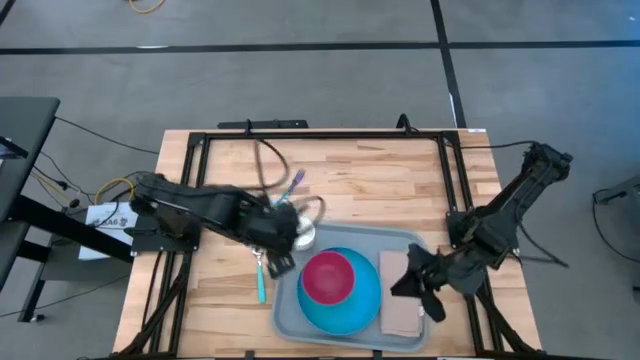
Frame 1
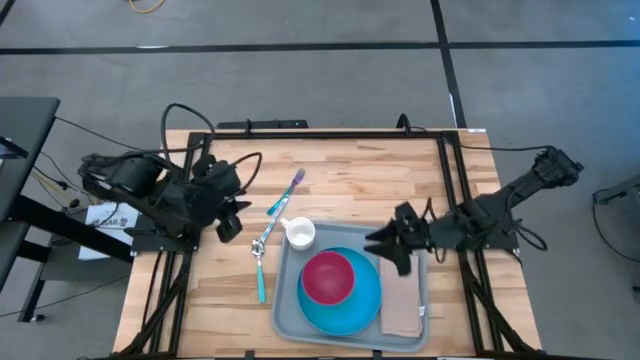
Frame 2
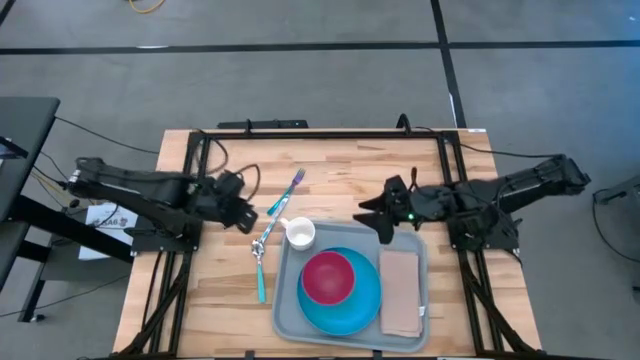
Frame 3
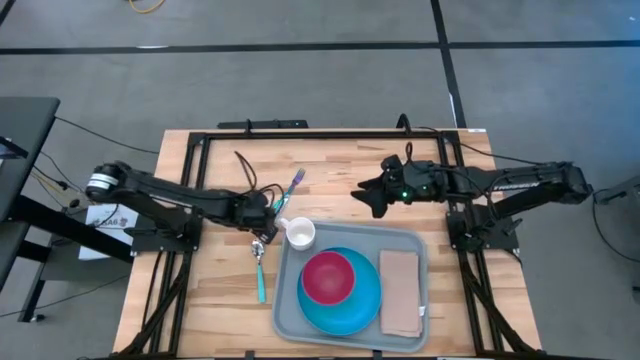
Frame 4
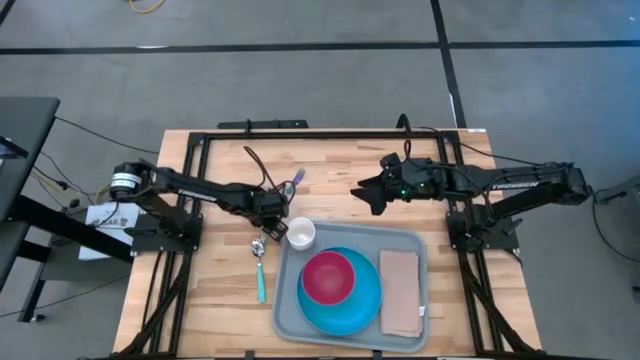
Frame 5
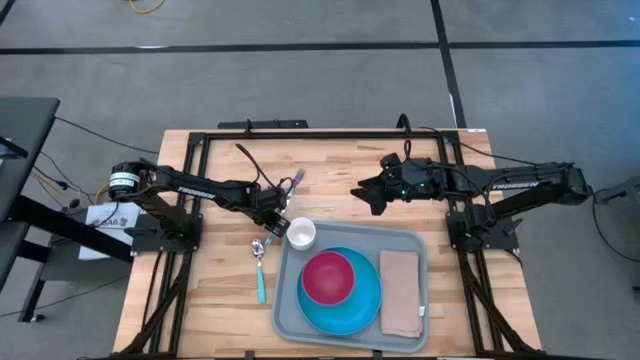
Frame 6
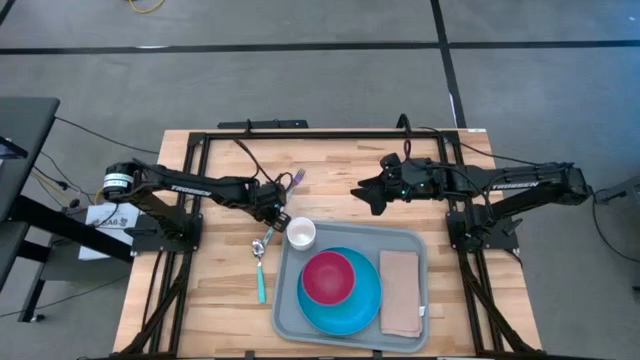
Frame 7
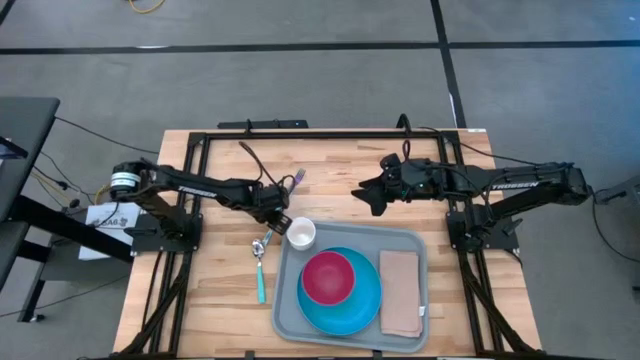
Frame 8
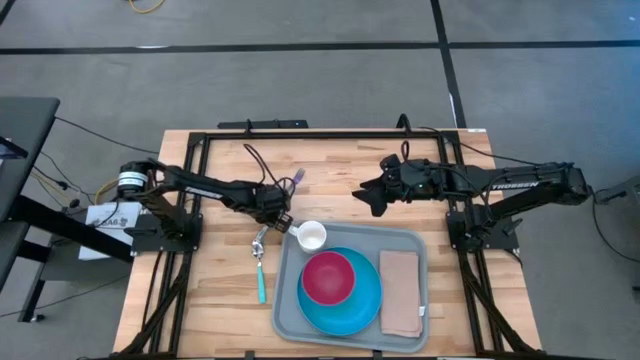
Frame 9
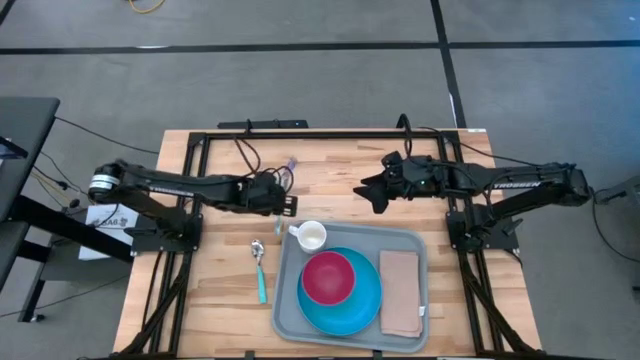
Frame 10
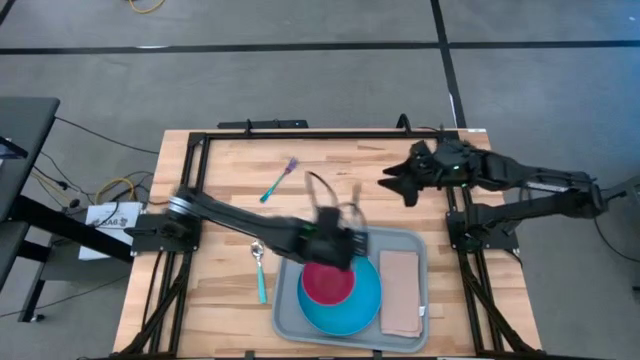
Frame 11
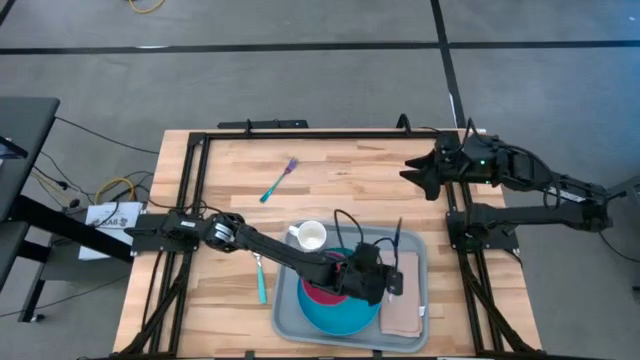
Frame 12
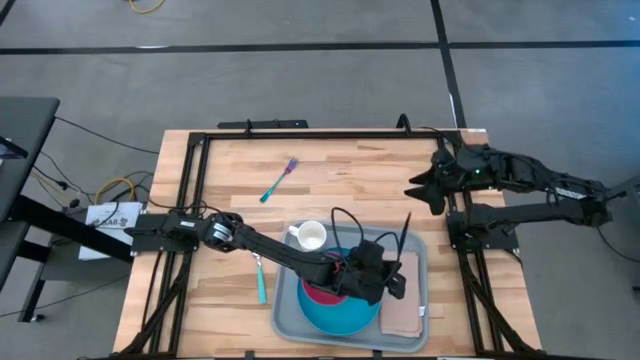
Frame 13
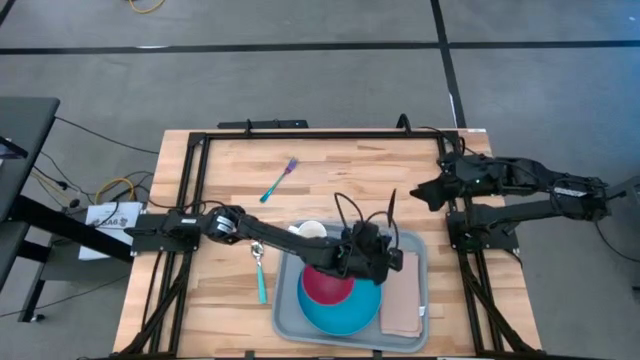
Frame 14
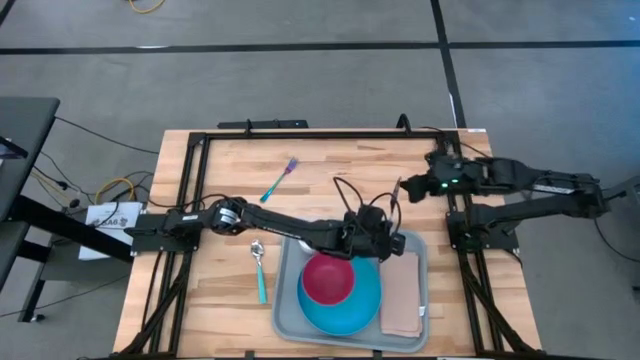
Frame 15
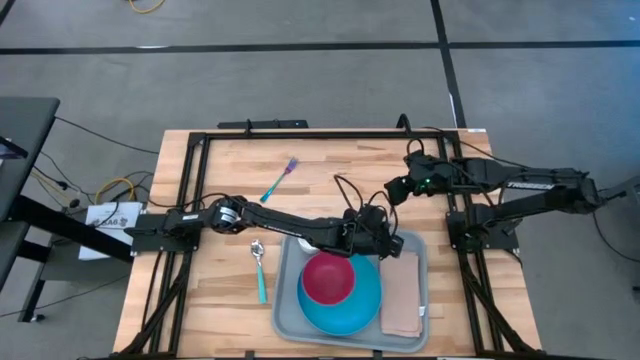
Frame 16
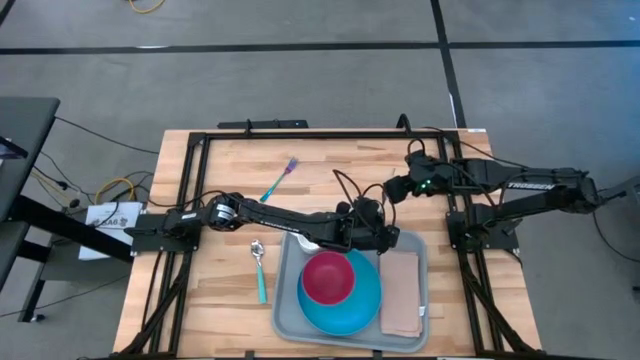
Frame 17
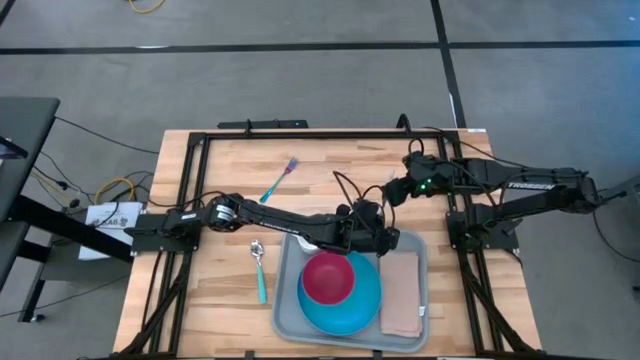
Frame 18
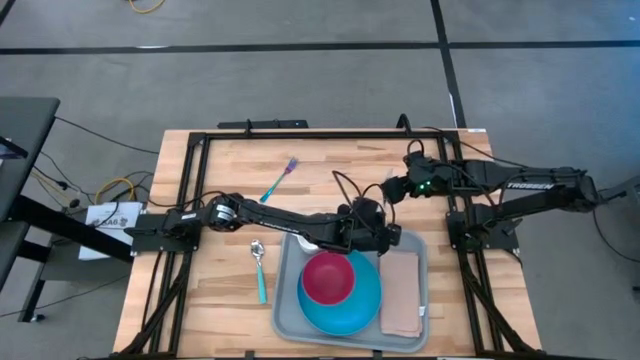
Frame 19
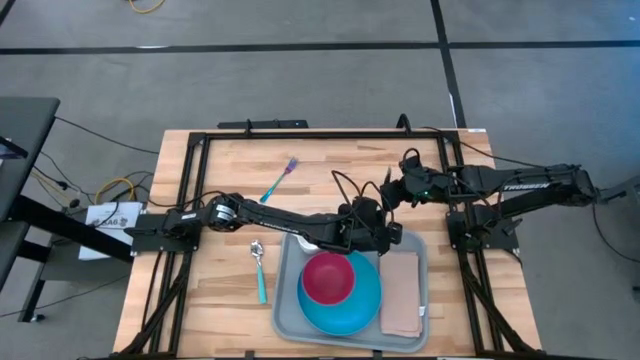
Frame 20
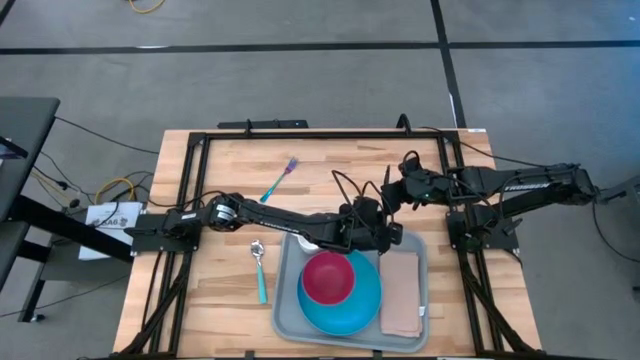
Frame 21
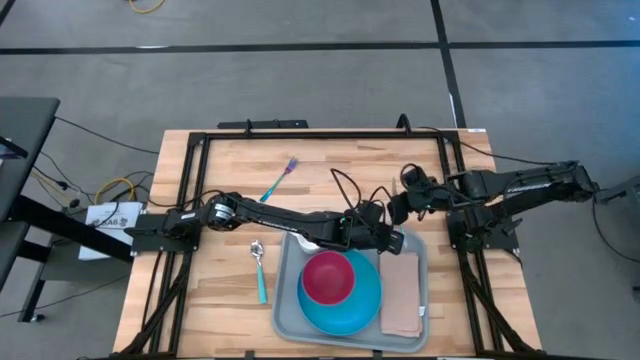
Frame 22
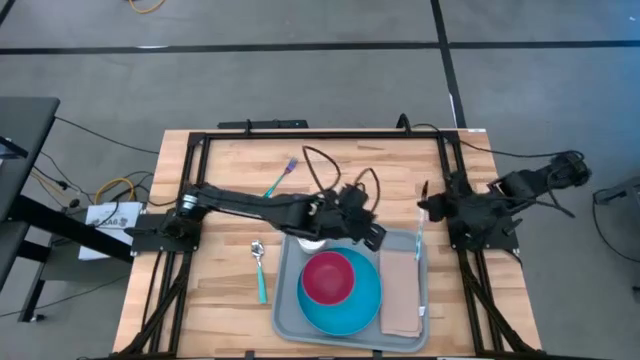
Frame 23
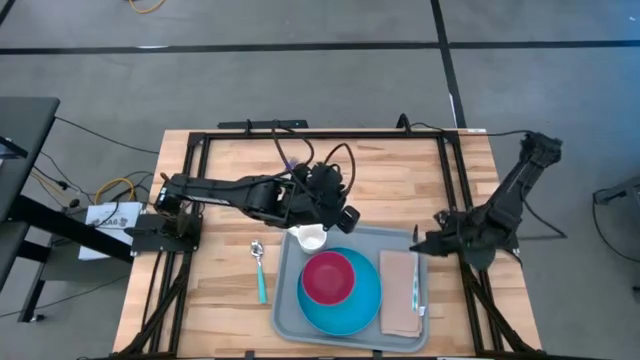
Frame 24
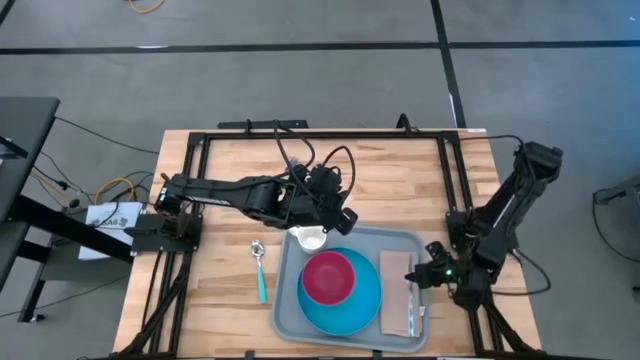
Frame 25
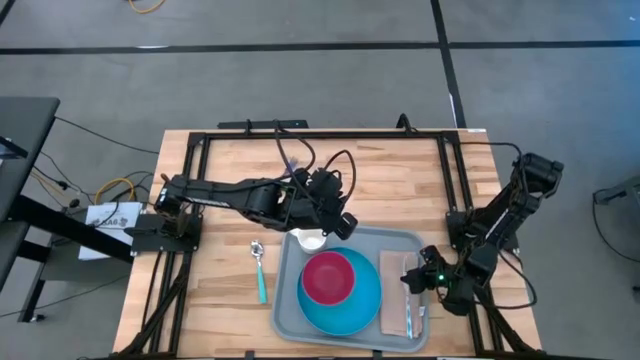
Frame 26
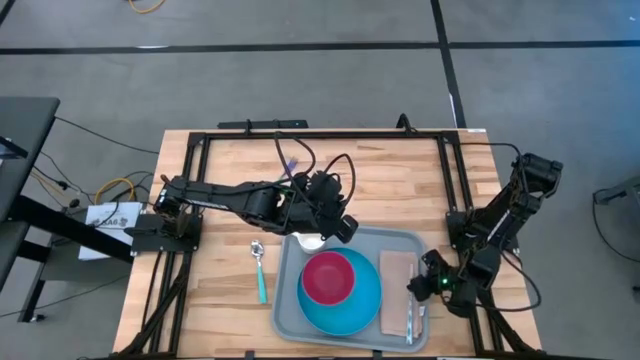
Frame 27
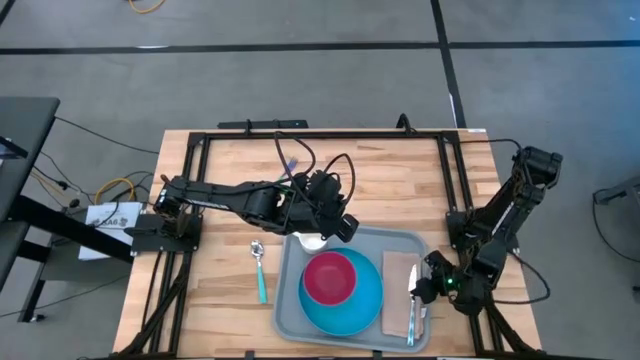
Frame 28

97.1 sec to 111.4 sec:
Task: Set up tray
Put the blue knife on the brown napkin

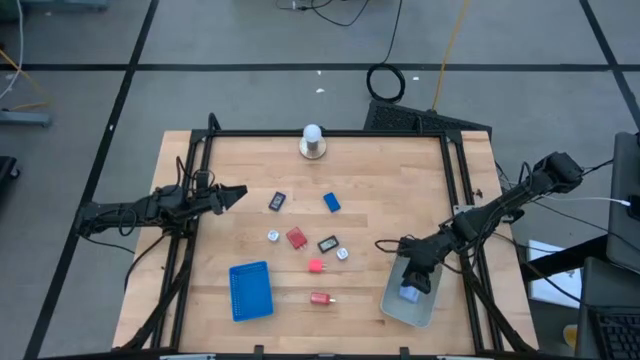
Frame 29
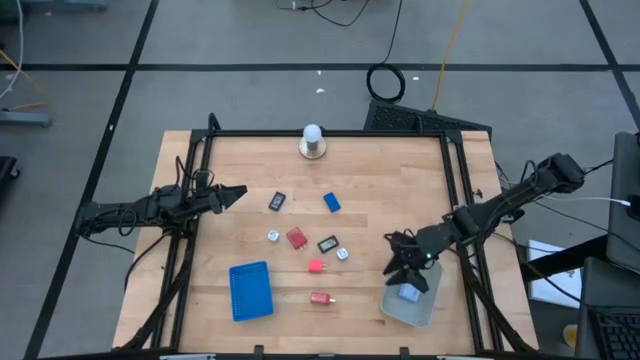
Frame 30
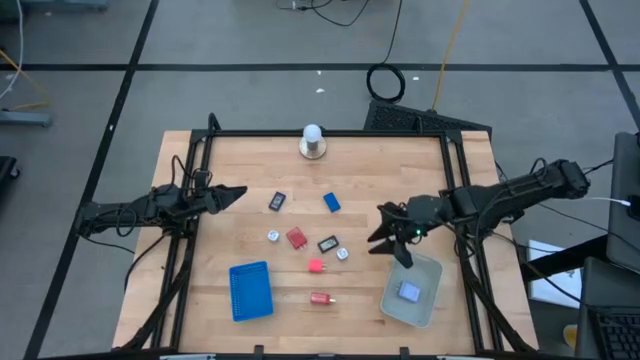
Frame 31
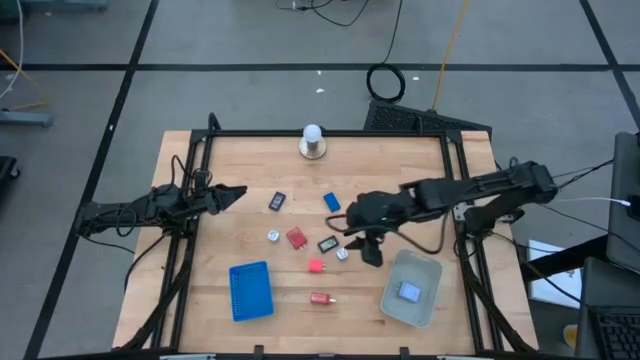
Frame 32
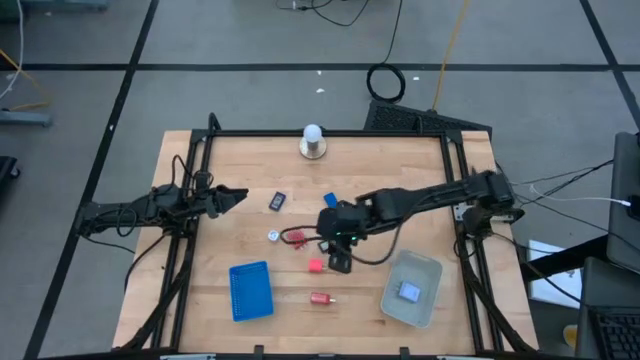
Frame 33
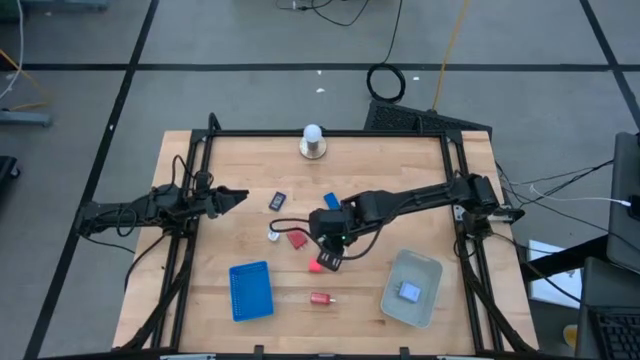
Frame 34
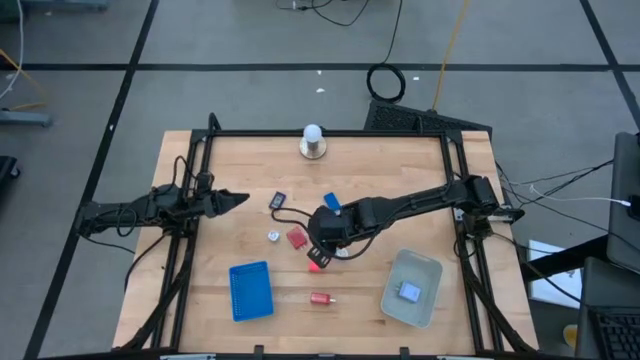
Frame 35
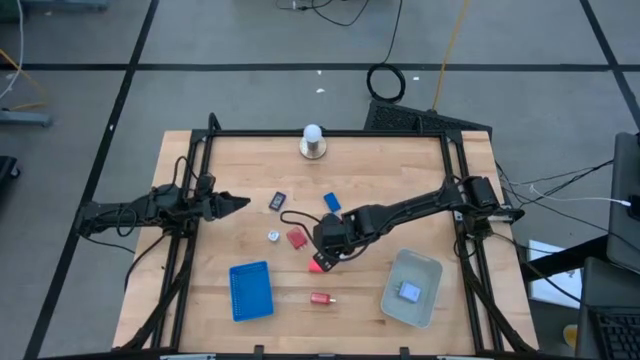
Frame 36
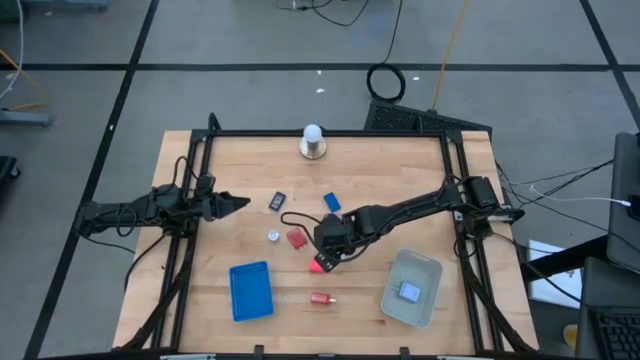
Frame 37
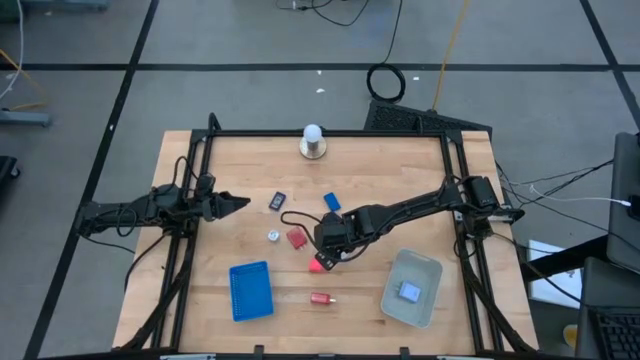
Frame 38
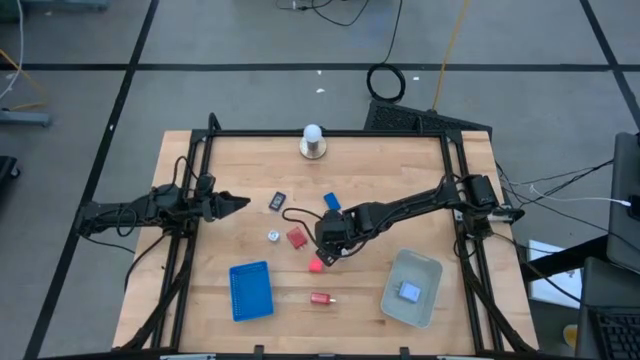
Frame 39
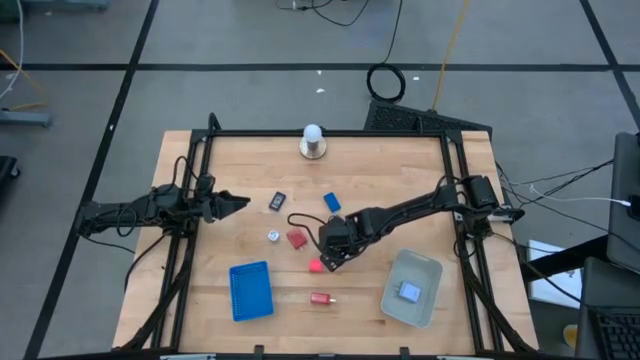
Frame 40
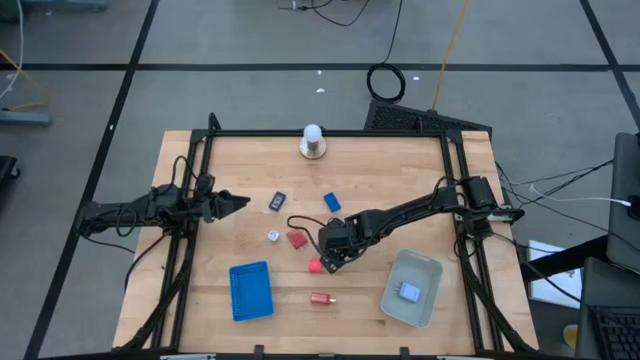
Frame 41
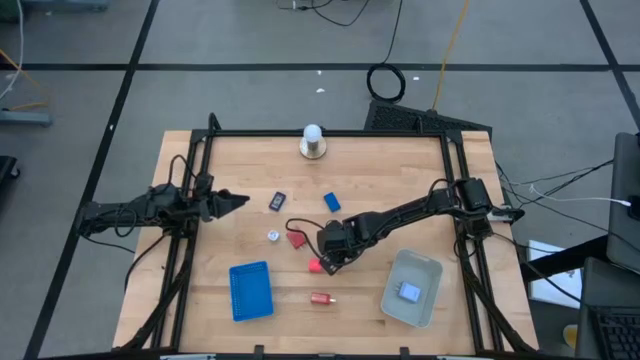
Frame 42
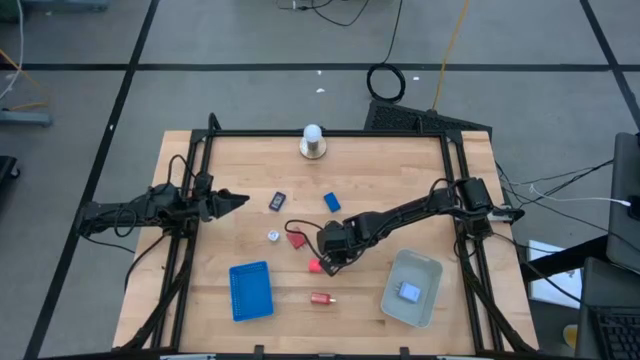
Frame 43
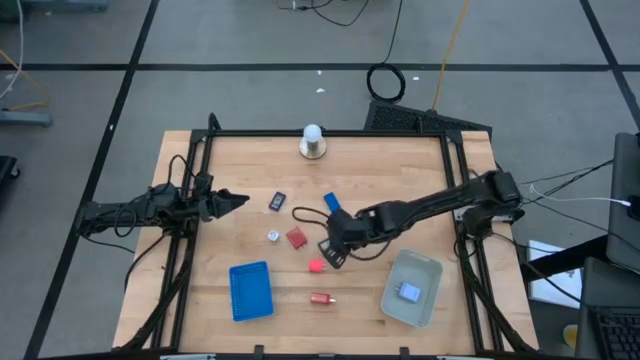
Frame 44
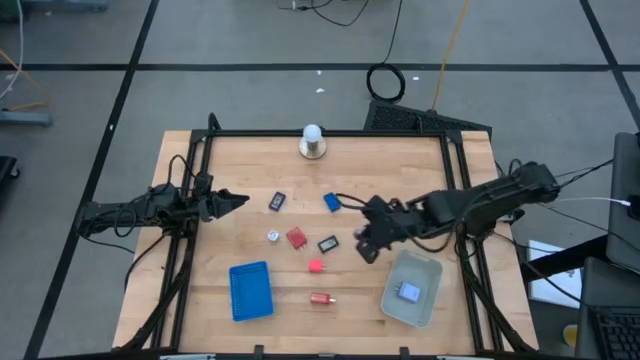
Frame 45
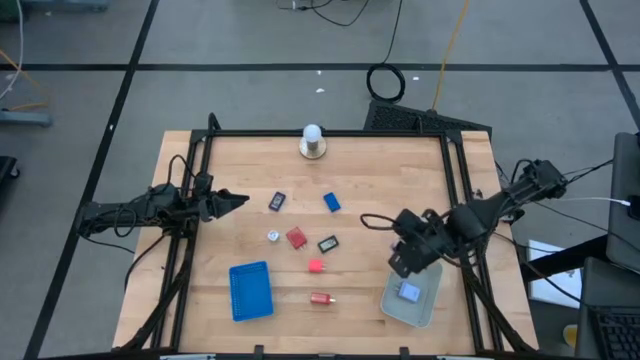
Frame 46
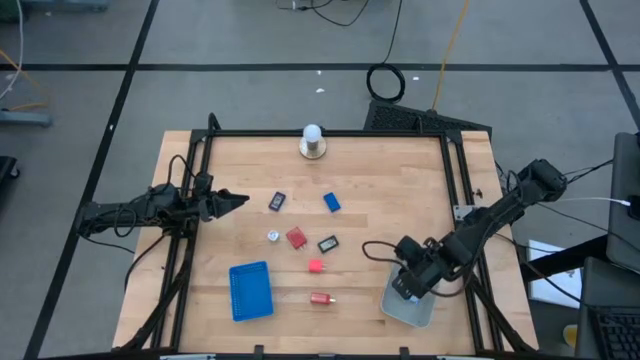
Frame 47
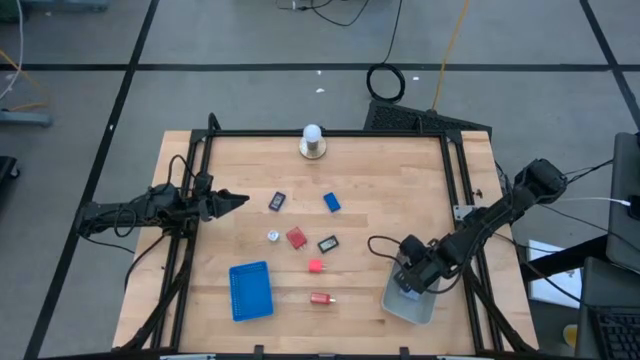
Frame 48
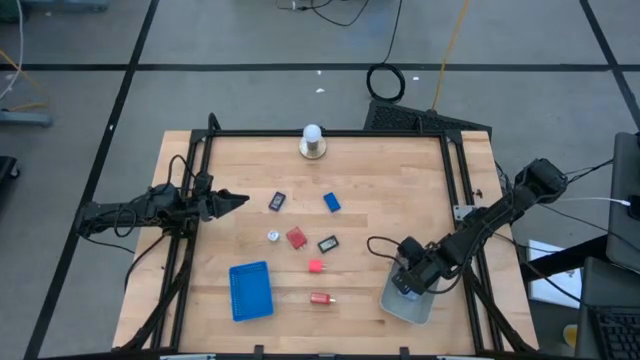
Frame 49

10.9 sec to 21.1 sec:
Task: Pick & Place Office items
Put the violet charger adapter into the gray bin
